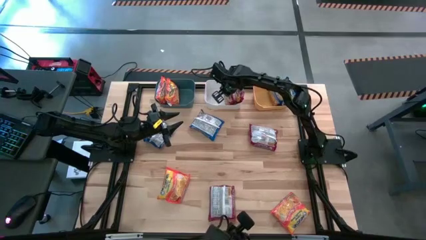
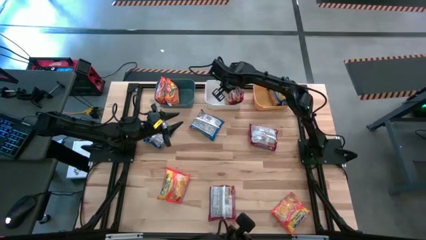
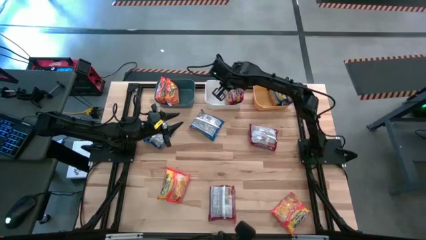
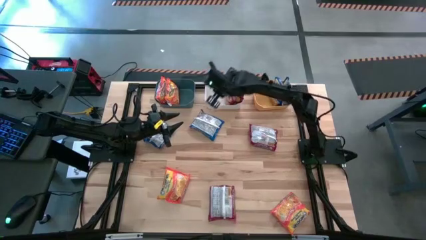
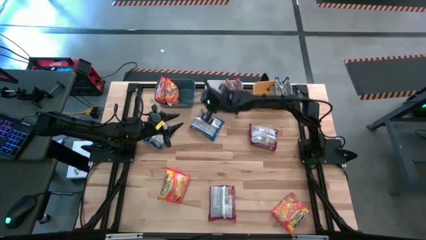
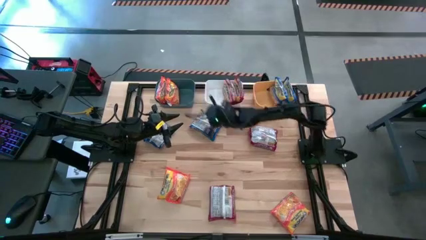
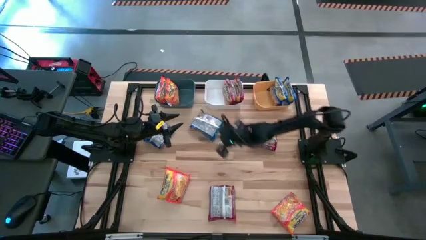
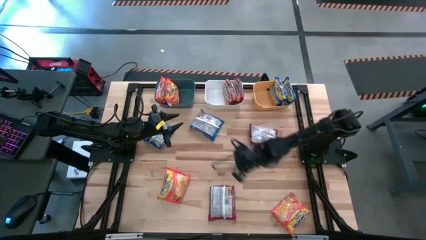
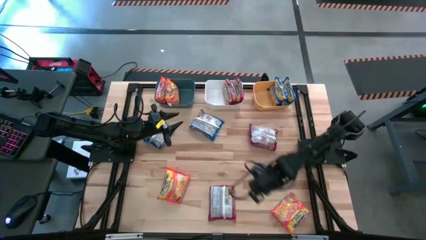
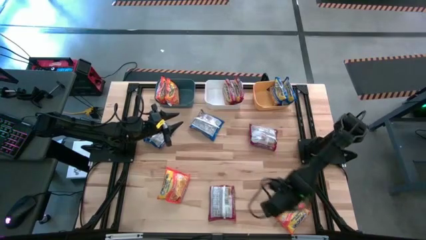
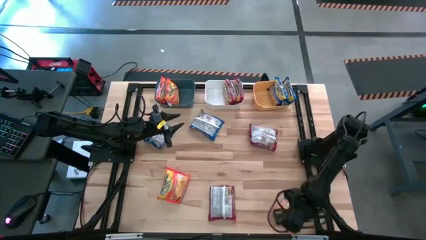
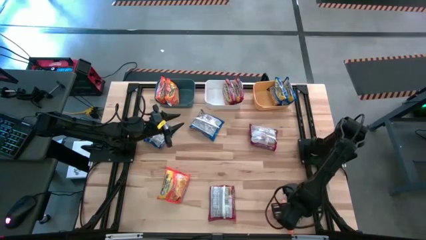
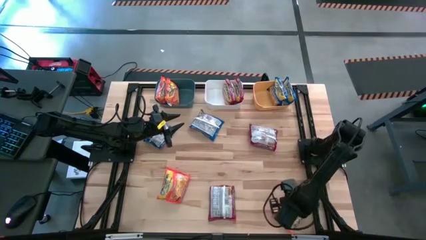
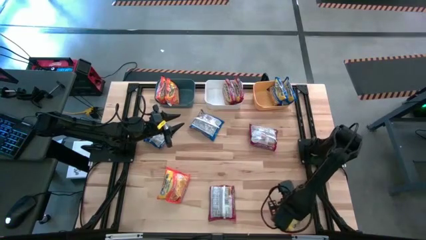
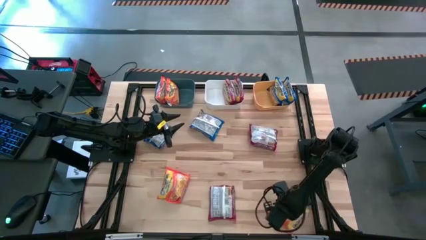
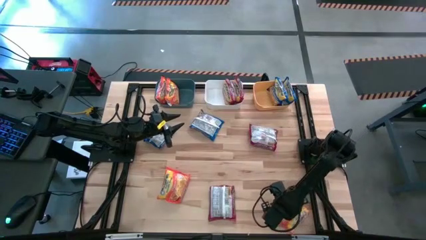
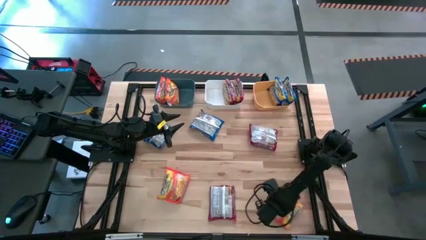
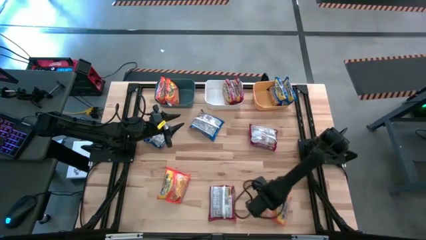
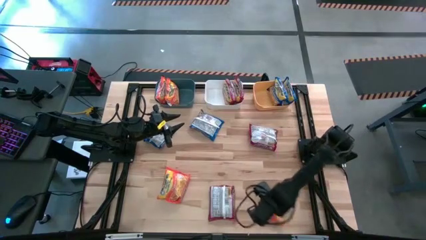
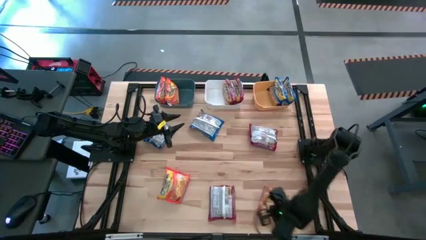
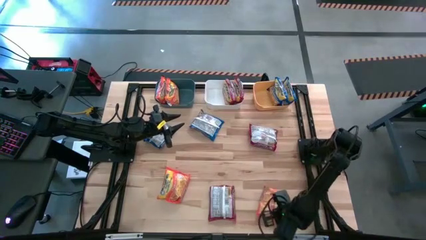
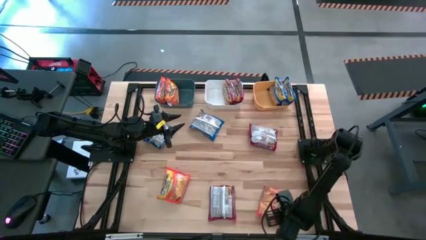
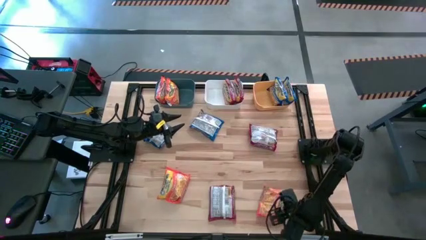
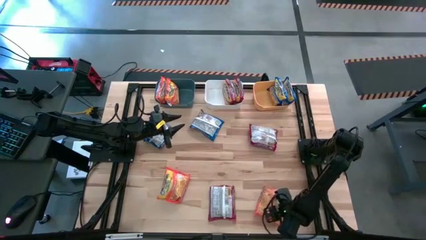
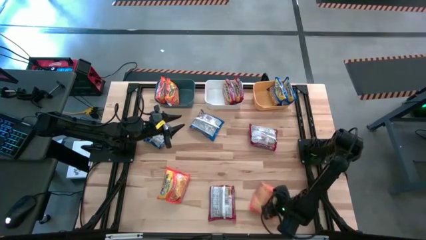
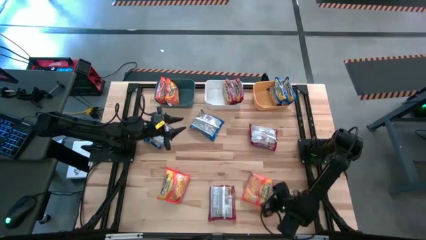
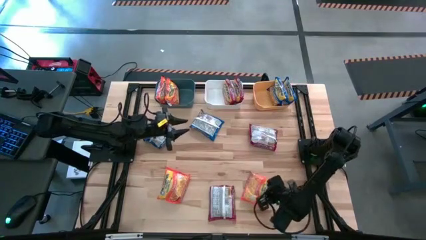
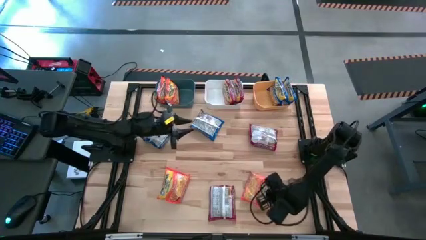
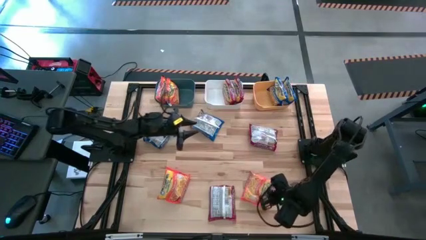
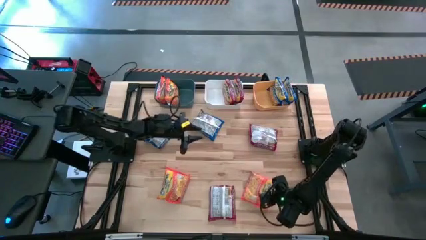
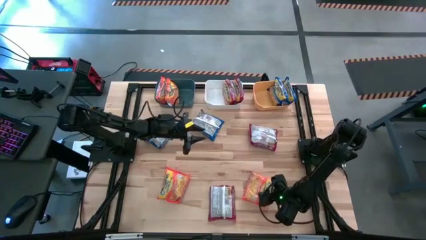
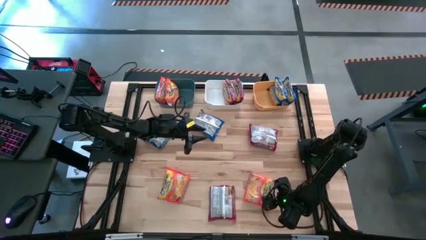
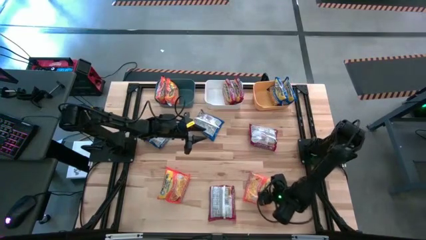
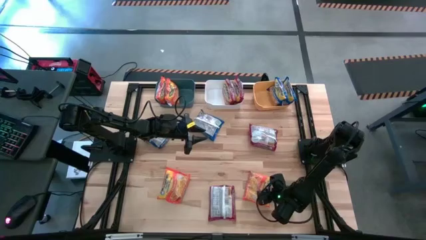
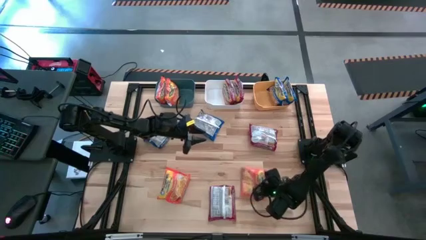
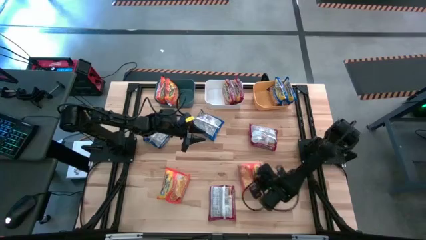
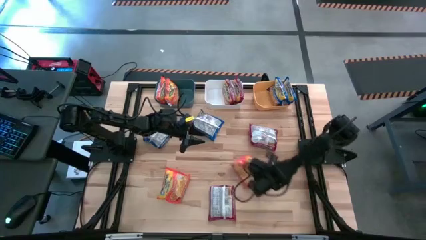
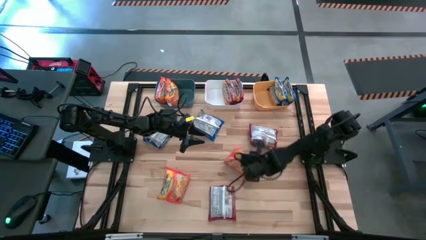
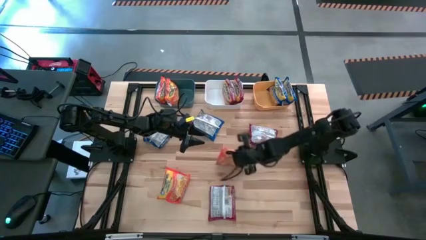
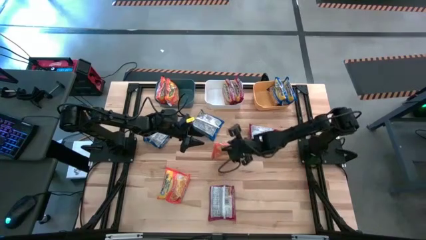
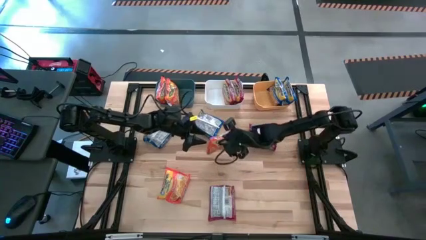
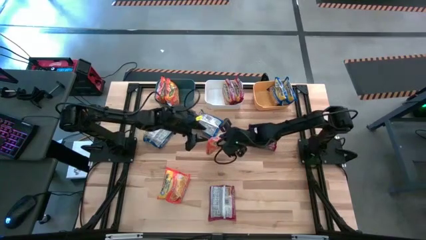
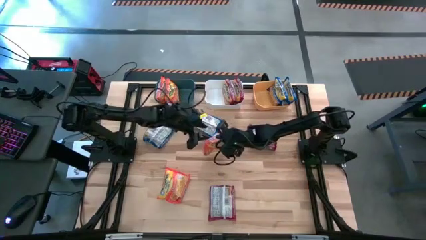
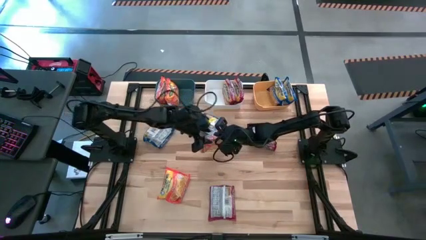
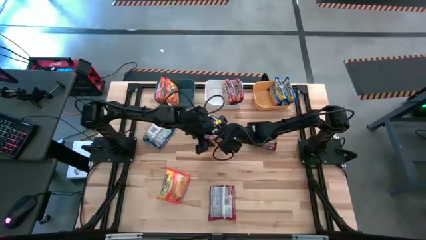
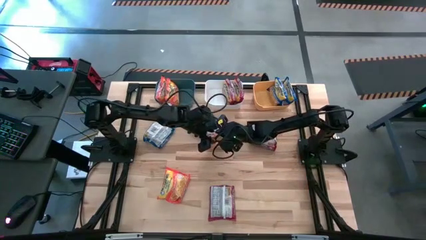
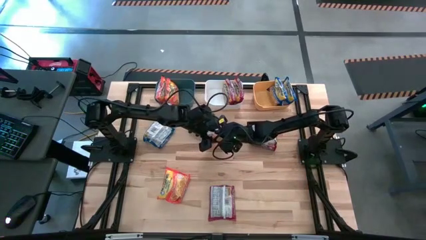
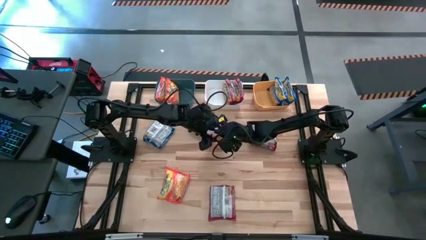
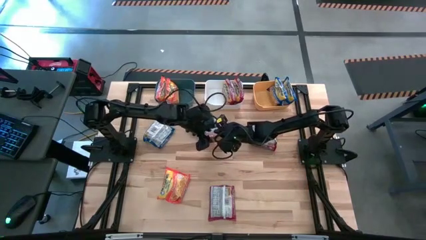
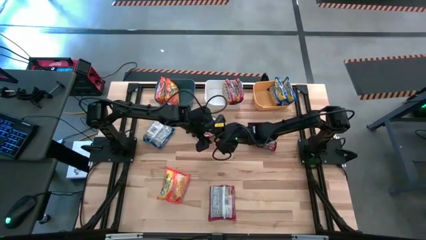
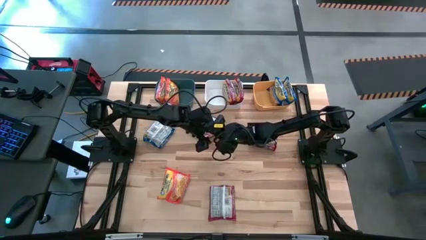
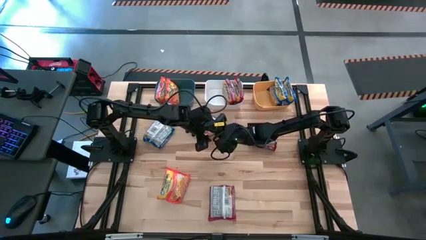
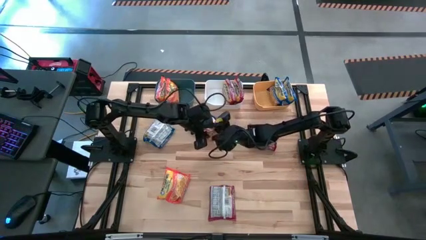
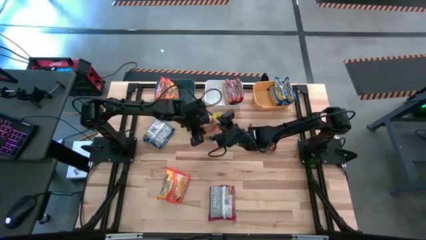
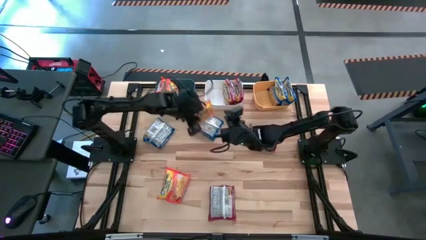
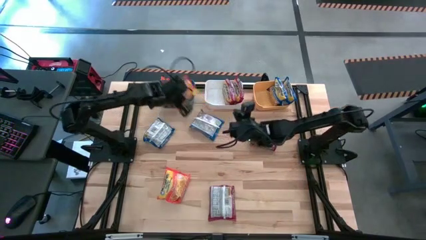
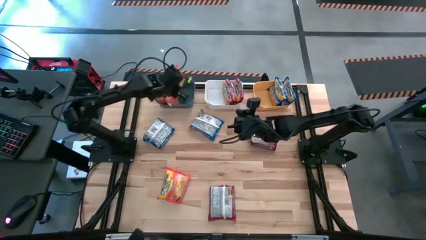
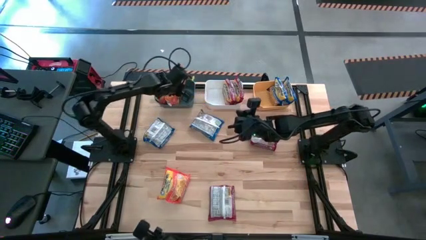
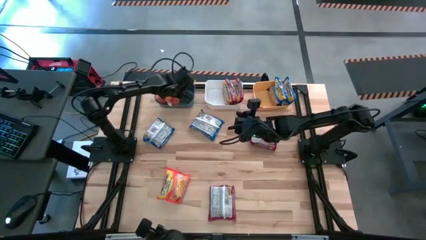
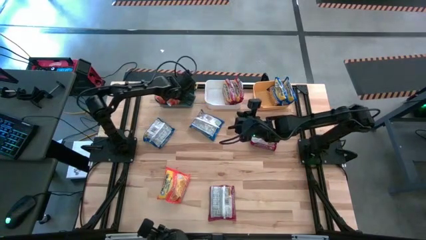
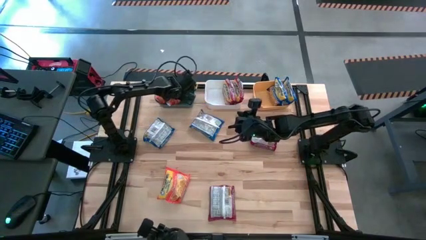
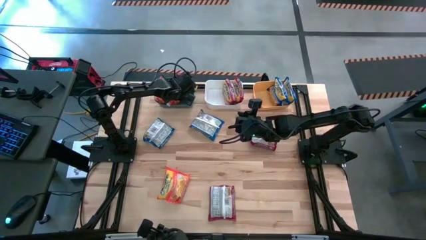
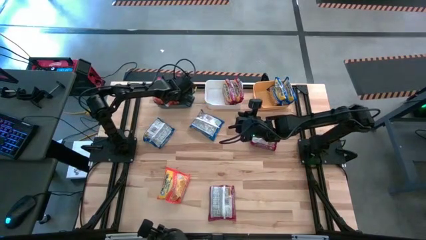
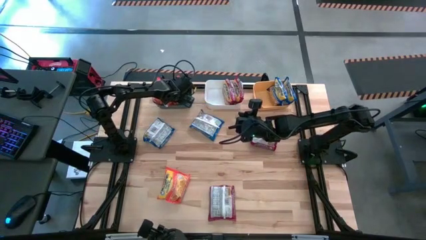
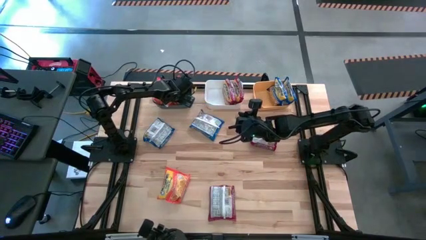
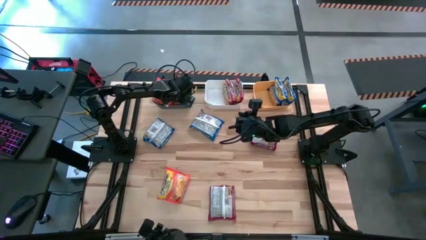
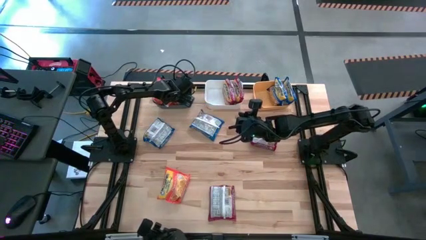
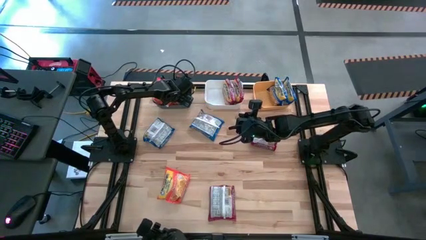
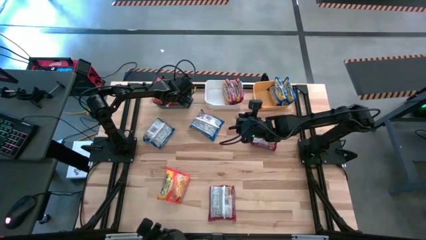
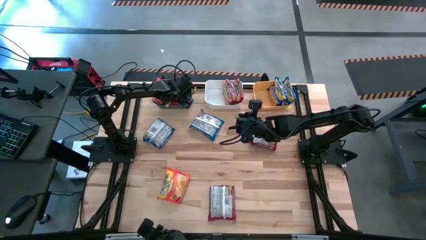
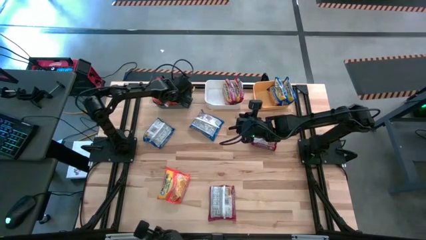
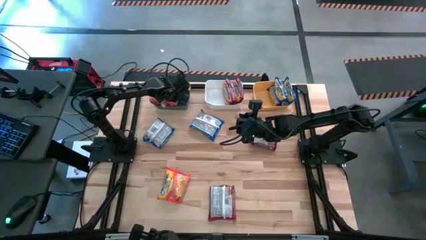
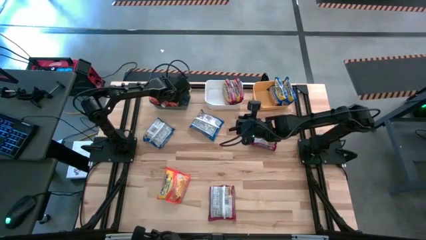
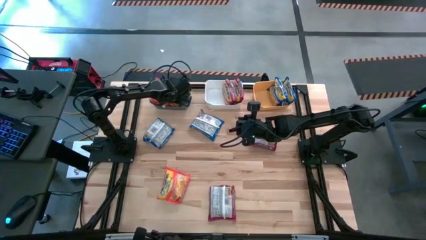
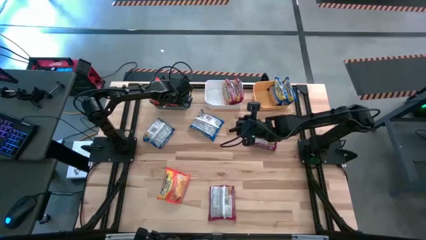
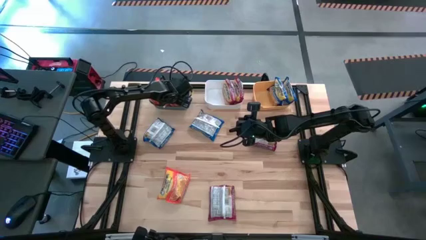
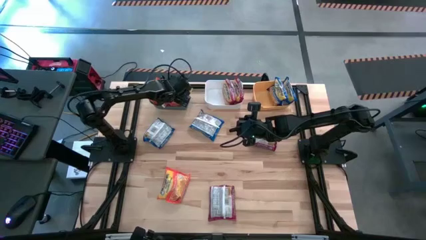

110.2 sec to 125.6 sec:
Task: Sort Maruchan noodles
Put the right orange noodle pack into the blue bin
